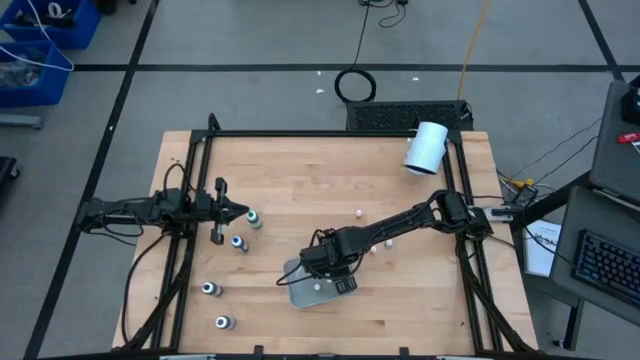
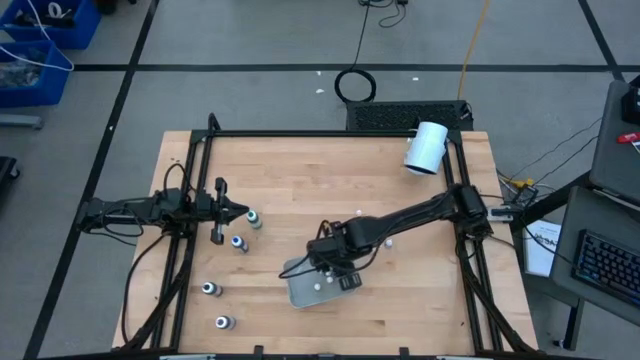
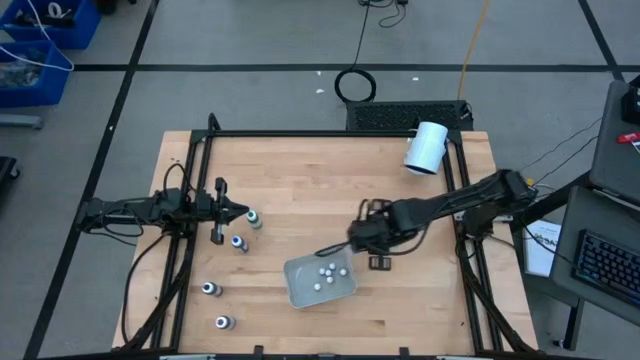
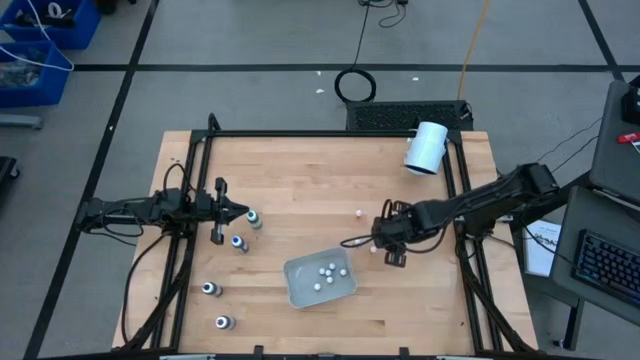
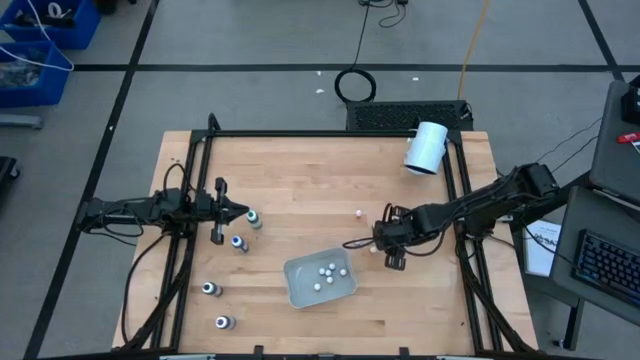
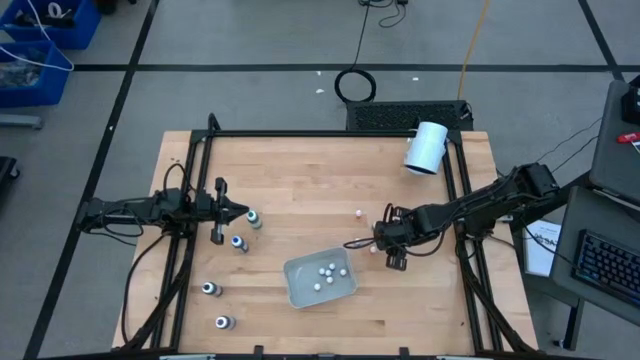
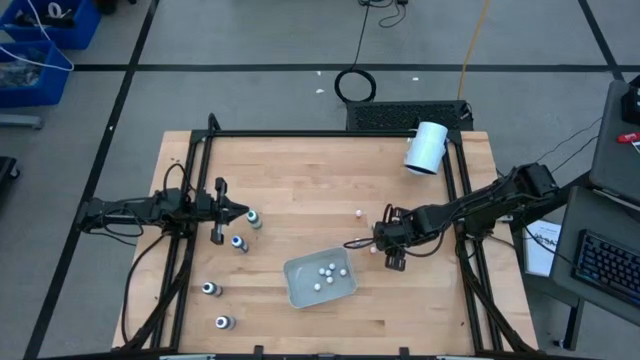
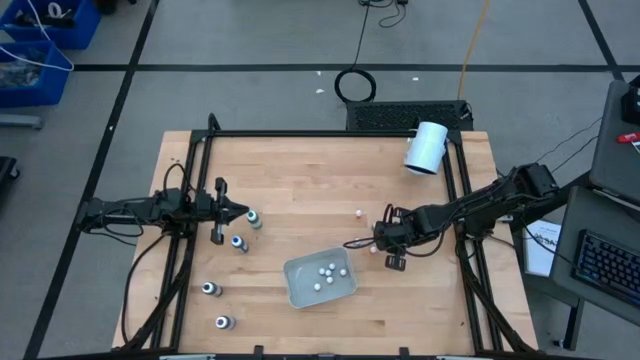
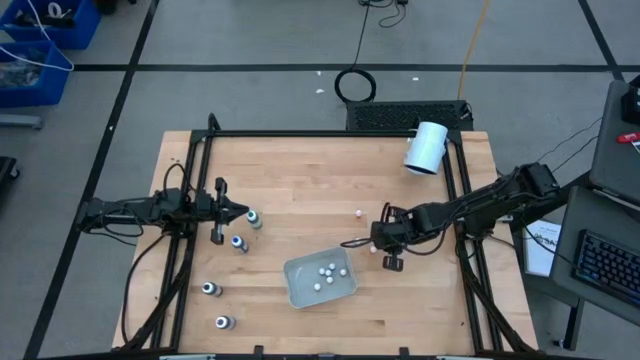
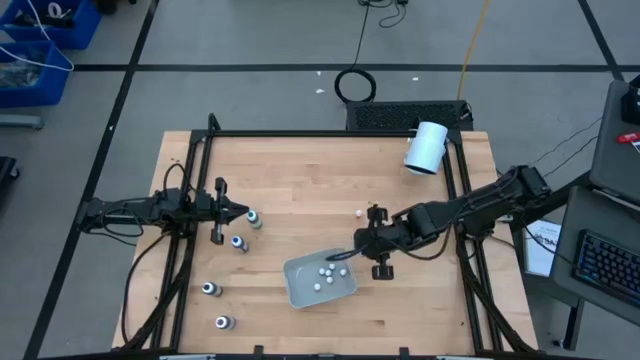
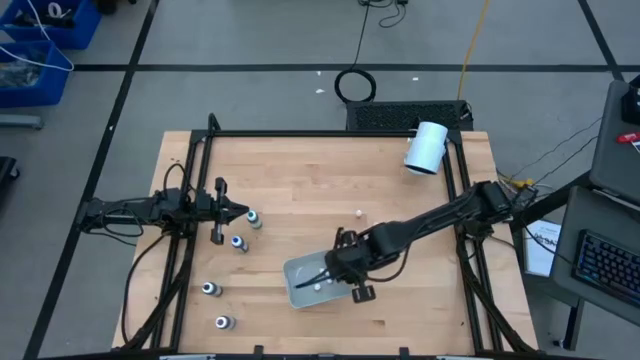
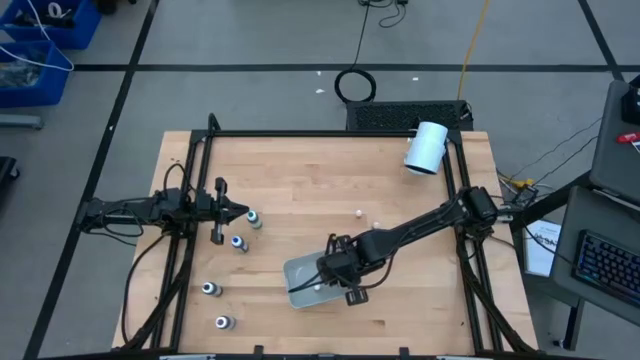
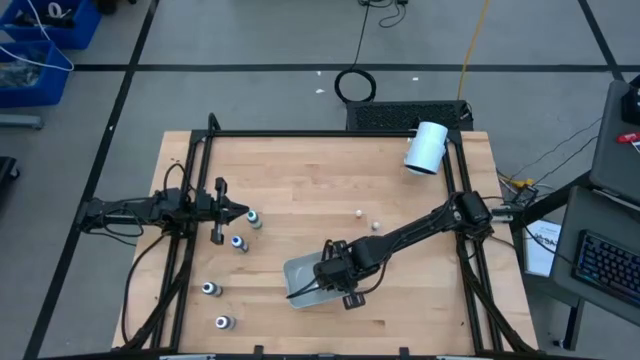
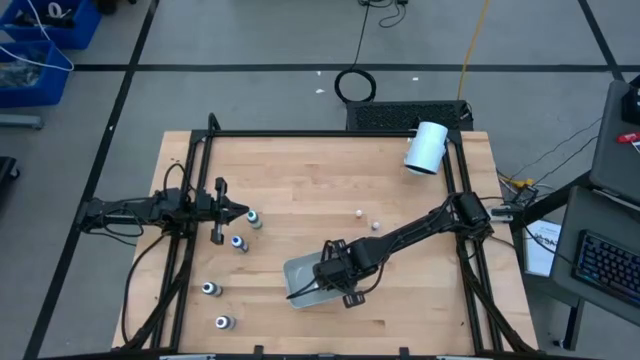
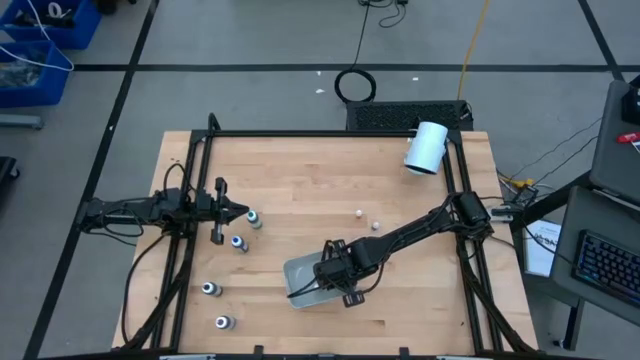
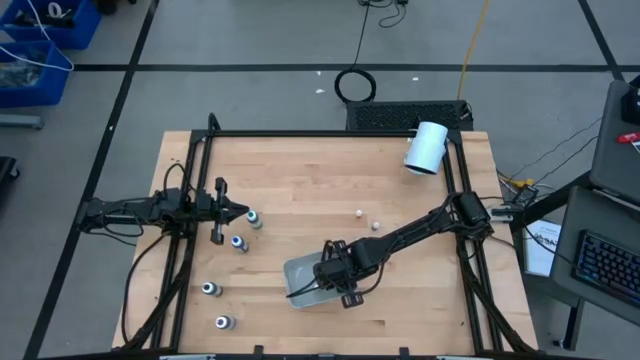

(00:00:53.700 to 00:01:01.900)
Task: Pick & Place food coloring
Put the small blue food coloring bottle in the gray bin

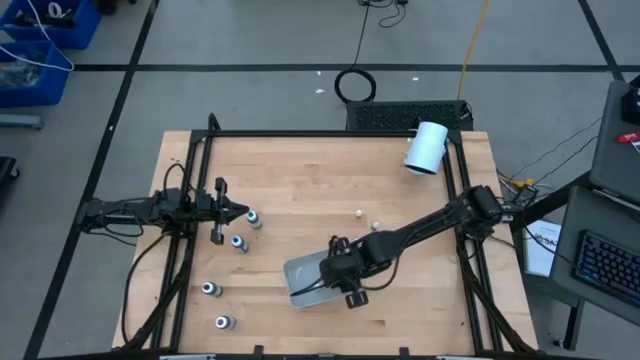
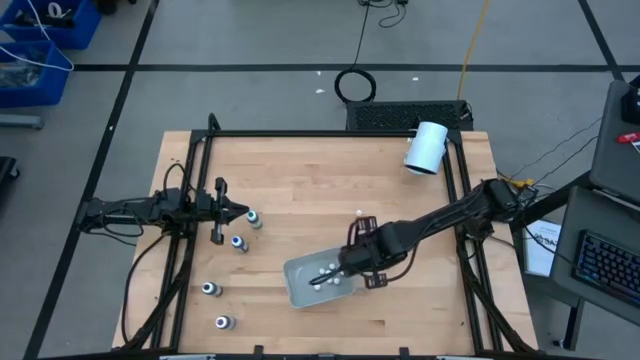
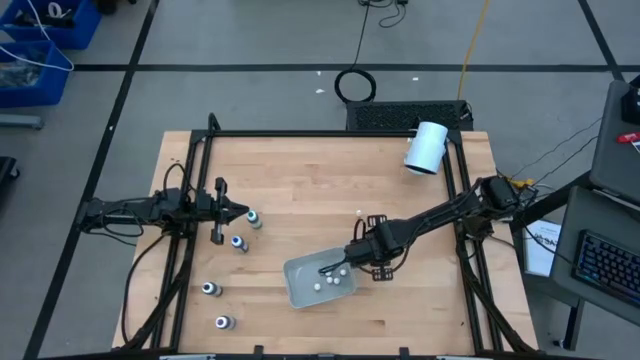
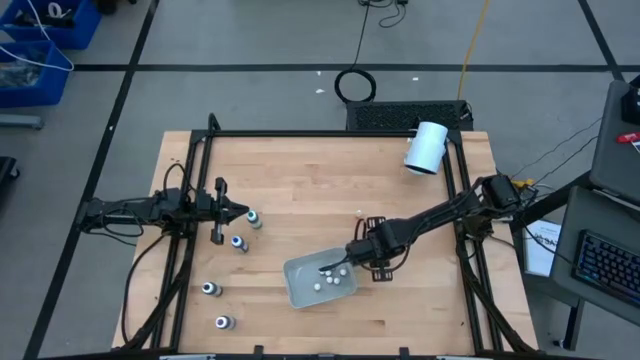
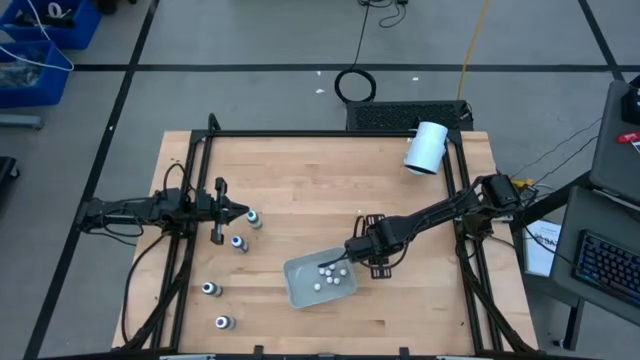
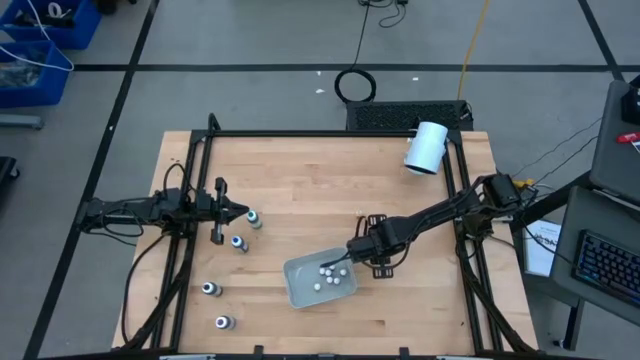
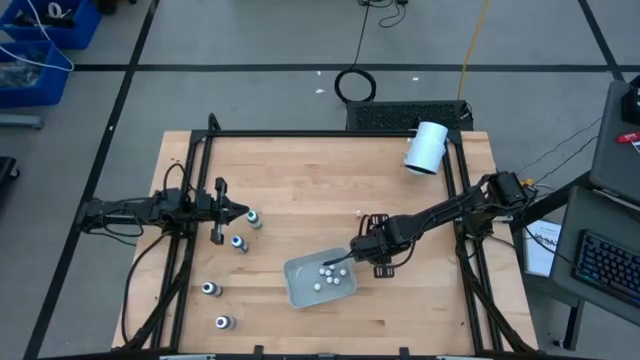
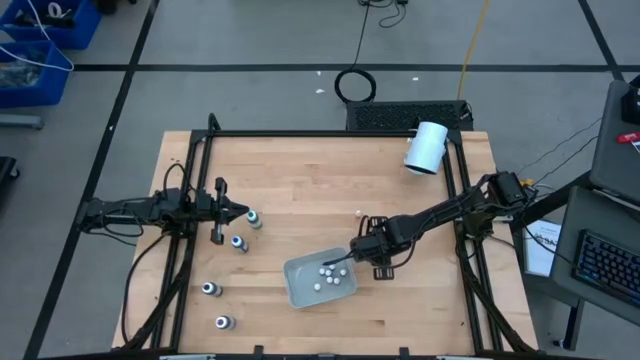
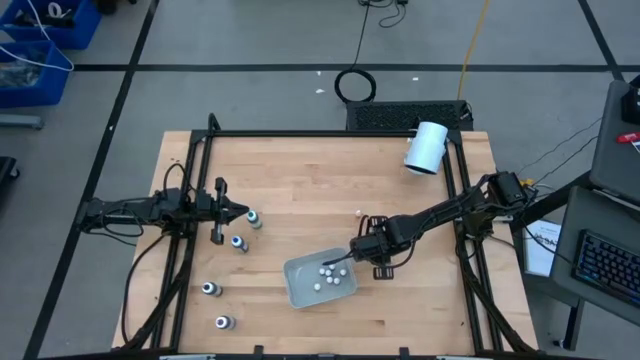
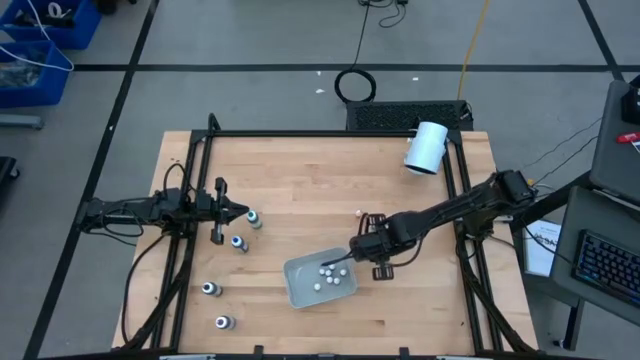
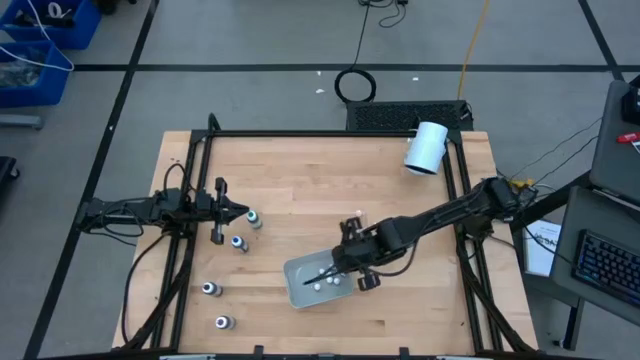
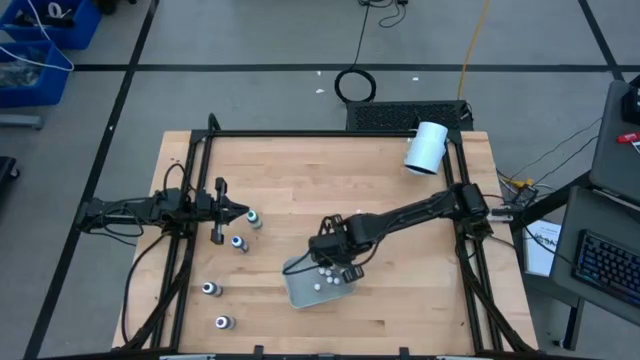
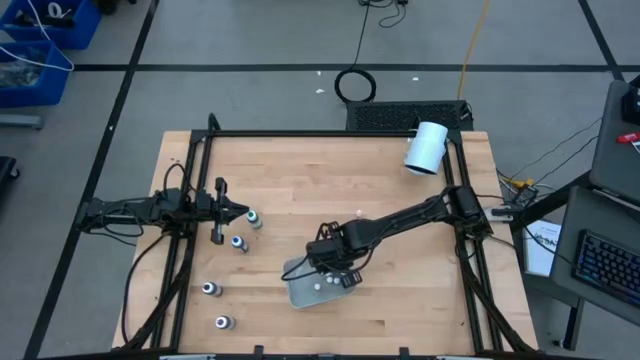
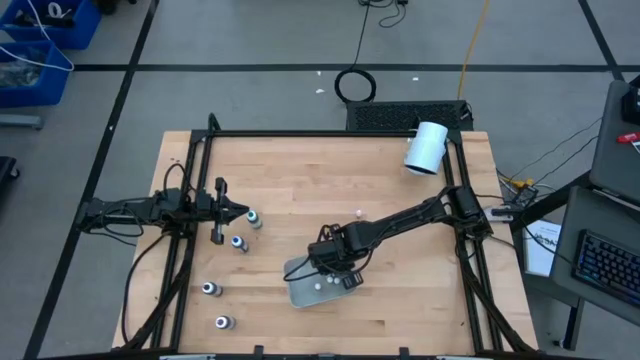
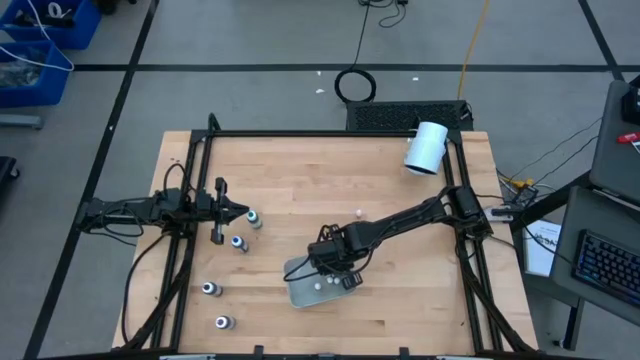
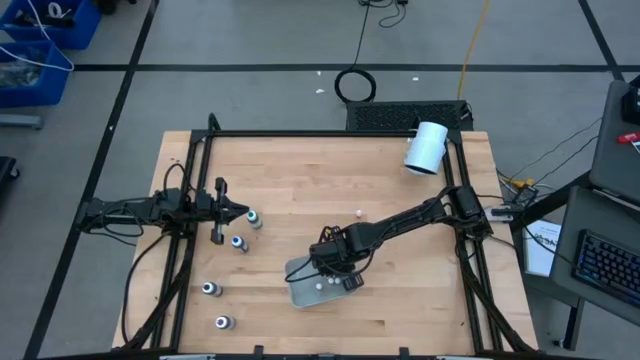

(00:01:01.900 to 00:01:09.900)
Put the small orange food coloring bottle in the gray bin

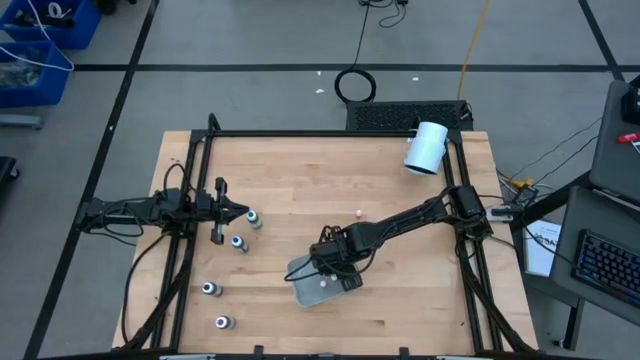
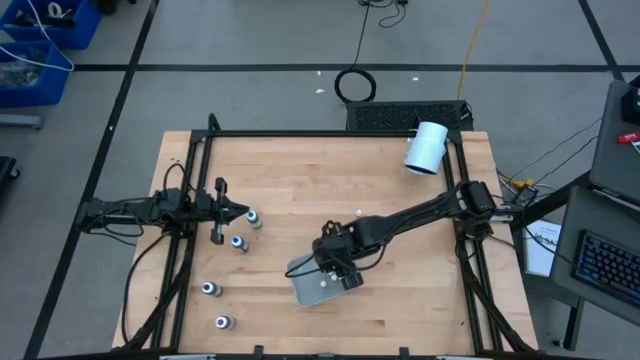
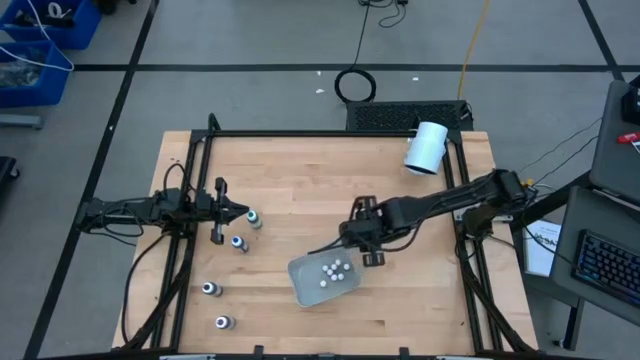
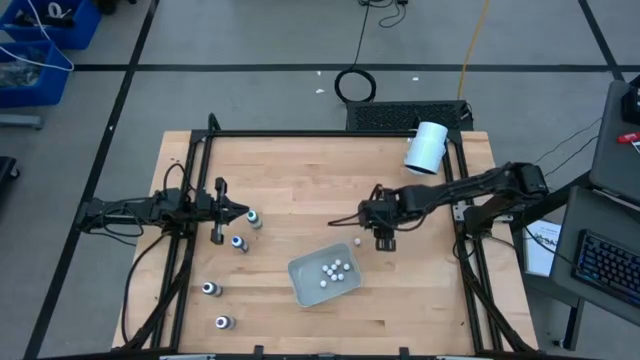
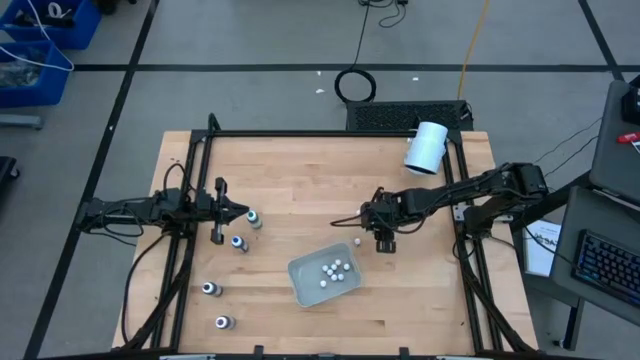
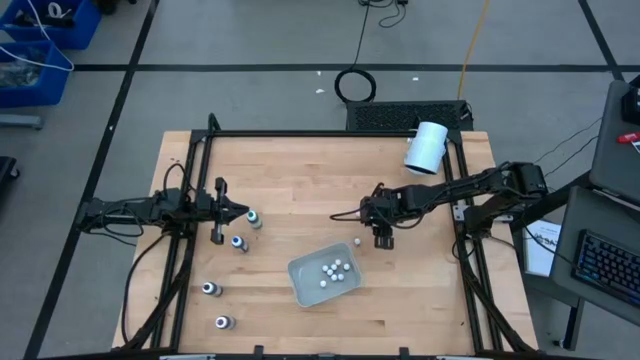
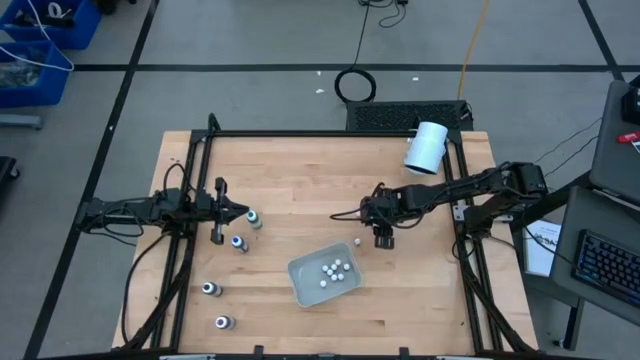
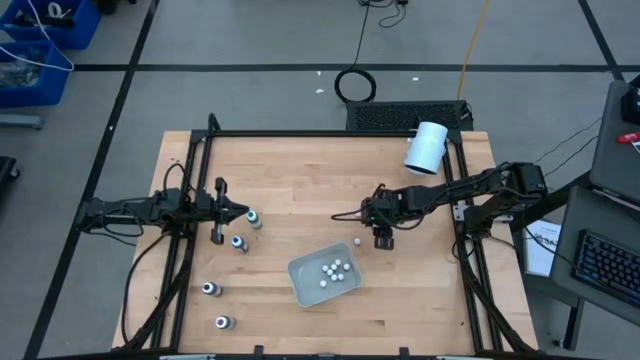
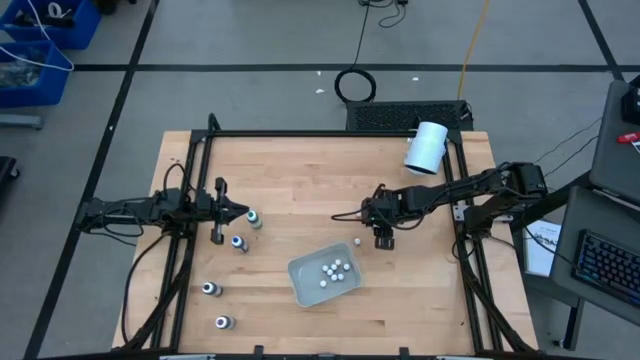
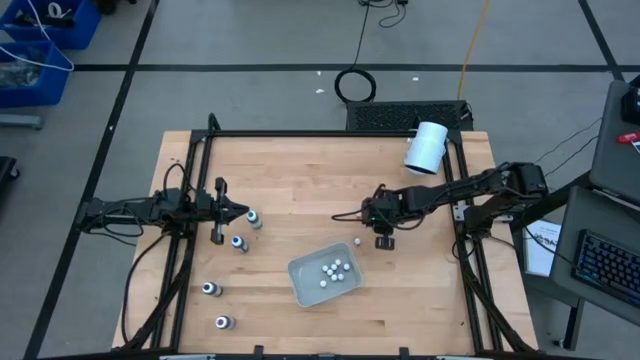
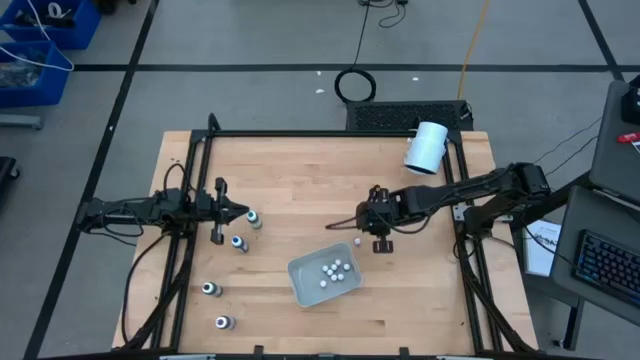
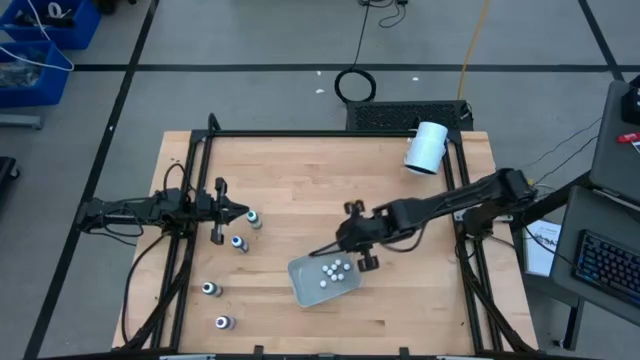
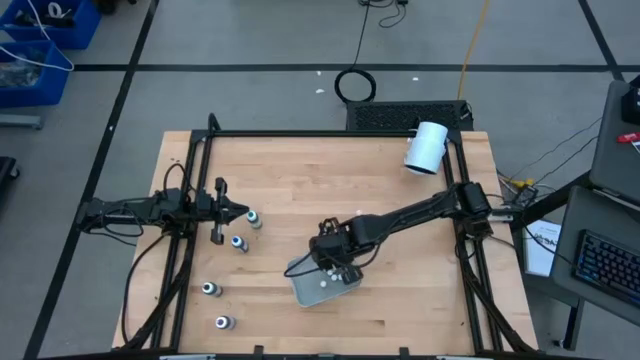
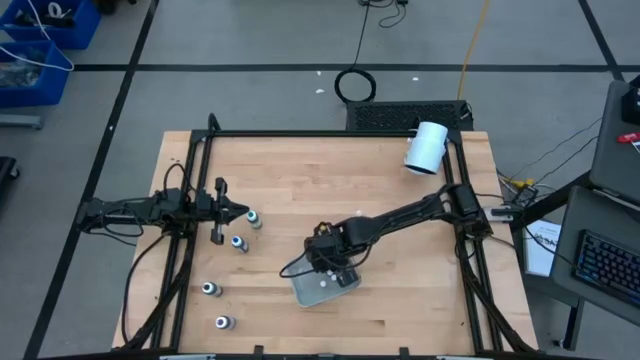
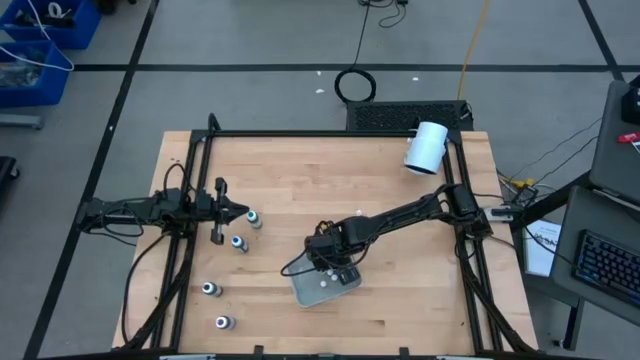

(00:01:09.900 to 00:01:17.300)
Put the small green food coloring bottle in the gray bin
